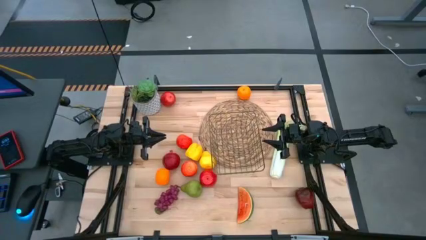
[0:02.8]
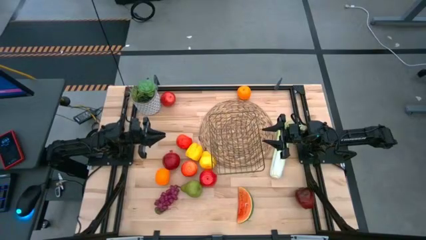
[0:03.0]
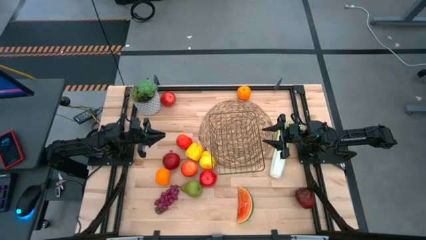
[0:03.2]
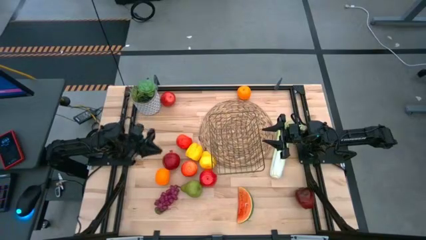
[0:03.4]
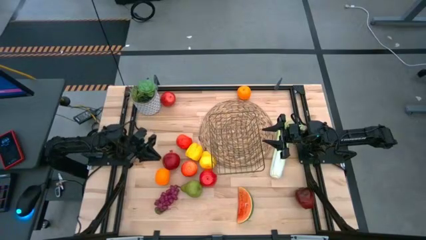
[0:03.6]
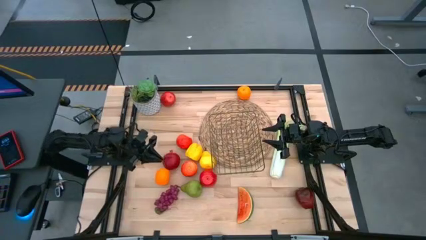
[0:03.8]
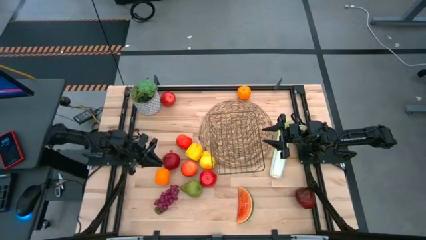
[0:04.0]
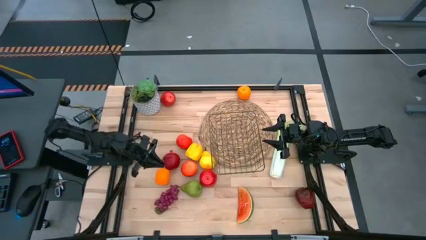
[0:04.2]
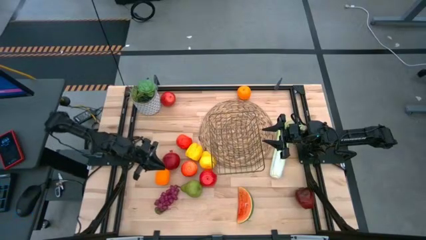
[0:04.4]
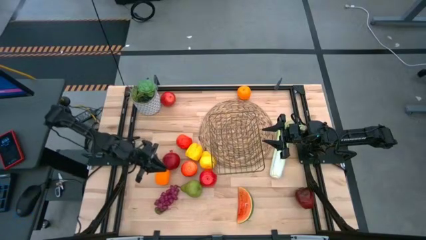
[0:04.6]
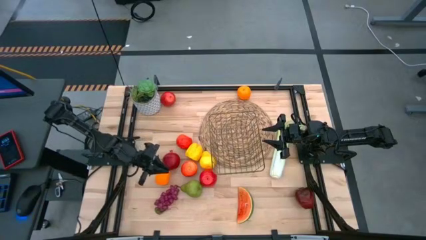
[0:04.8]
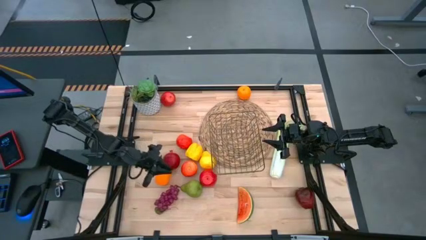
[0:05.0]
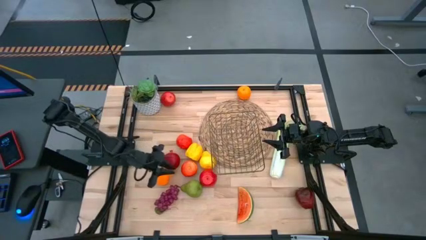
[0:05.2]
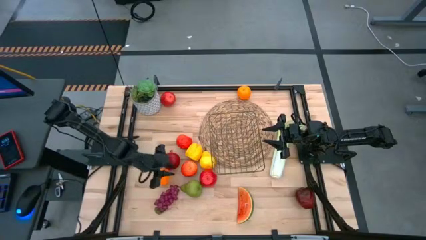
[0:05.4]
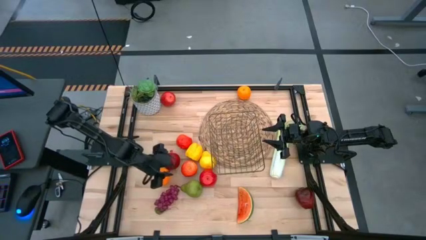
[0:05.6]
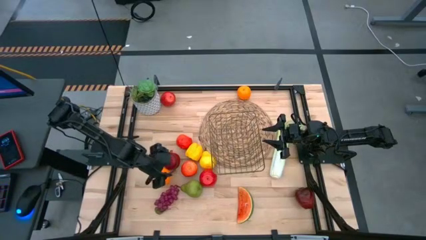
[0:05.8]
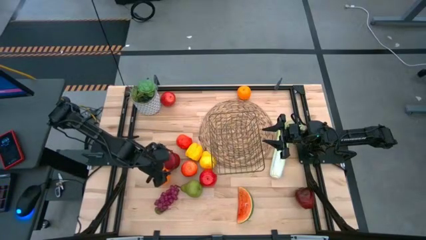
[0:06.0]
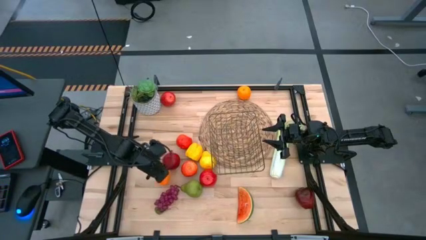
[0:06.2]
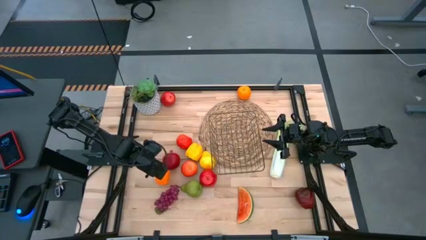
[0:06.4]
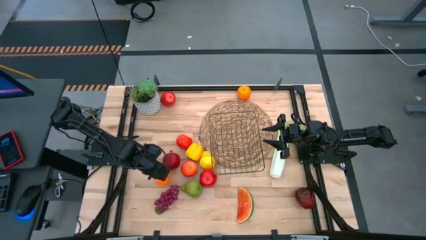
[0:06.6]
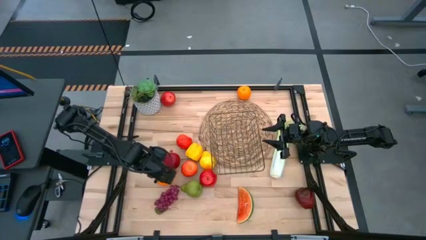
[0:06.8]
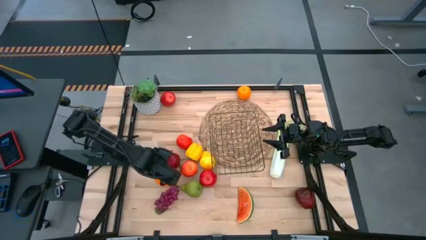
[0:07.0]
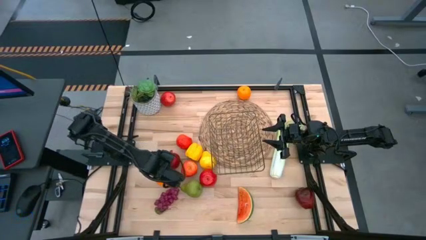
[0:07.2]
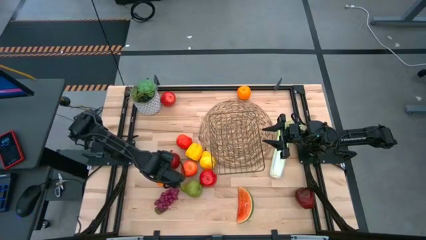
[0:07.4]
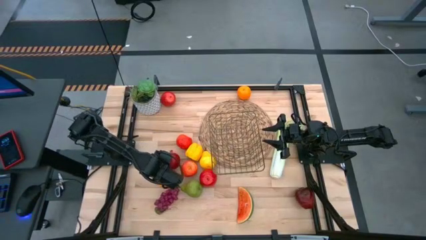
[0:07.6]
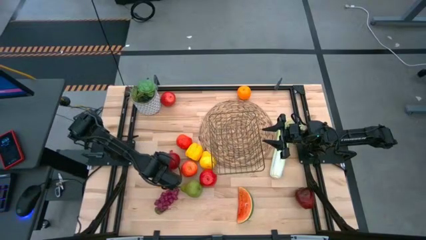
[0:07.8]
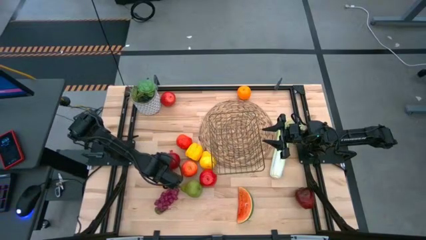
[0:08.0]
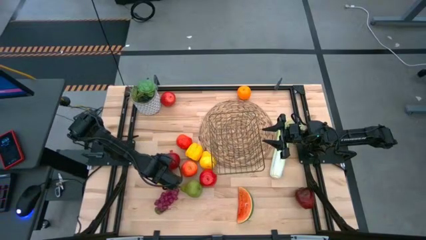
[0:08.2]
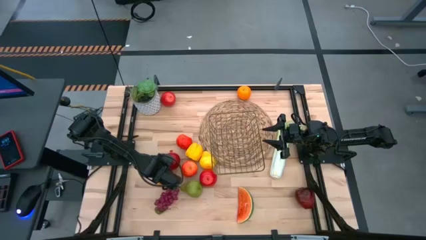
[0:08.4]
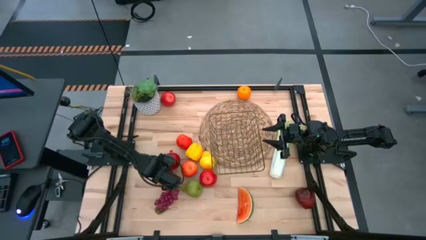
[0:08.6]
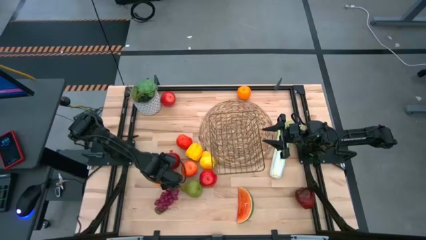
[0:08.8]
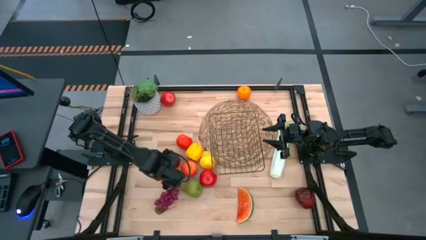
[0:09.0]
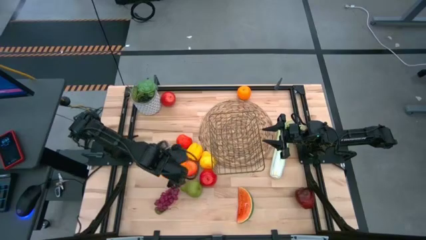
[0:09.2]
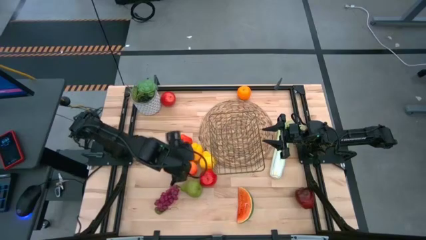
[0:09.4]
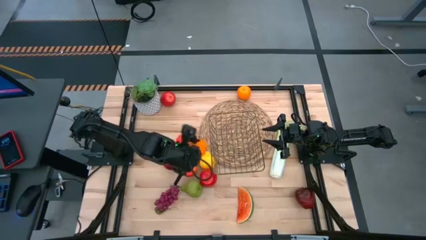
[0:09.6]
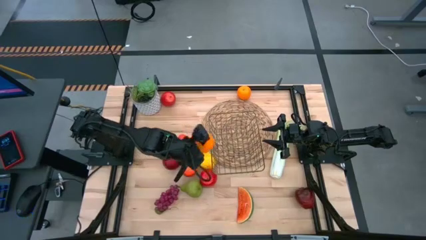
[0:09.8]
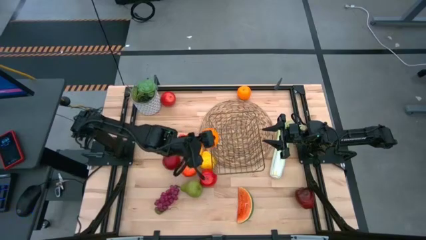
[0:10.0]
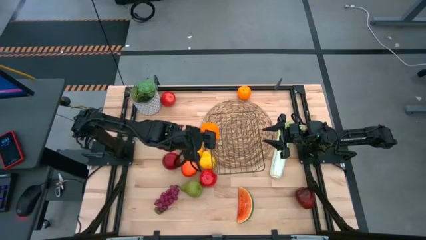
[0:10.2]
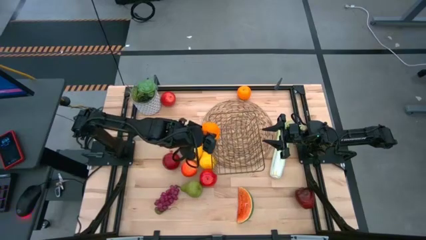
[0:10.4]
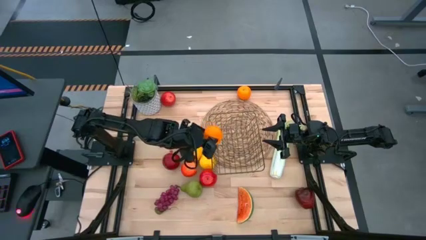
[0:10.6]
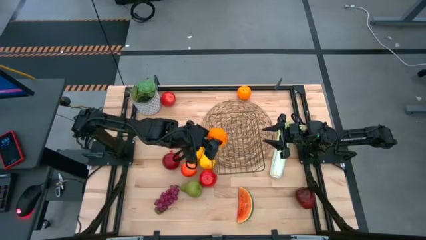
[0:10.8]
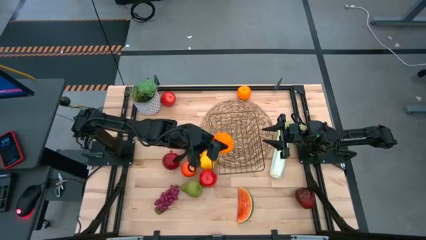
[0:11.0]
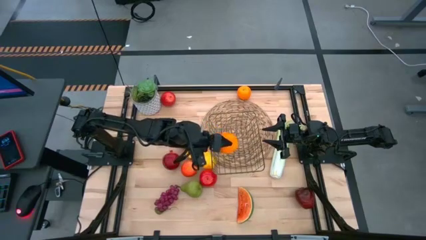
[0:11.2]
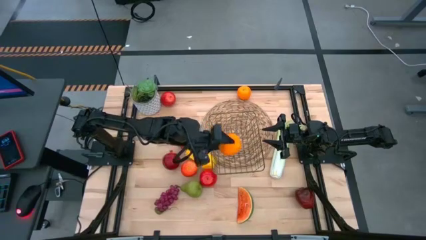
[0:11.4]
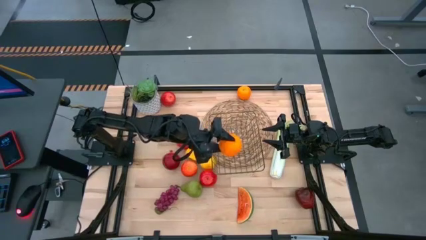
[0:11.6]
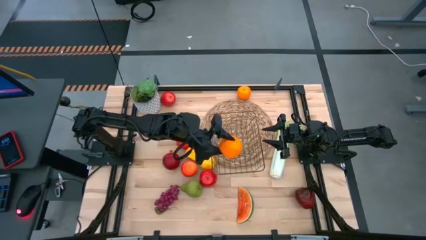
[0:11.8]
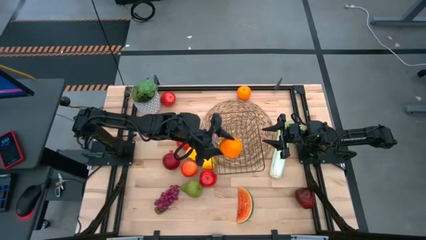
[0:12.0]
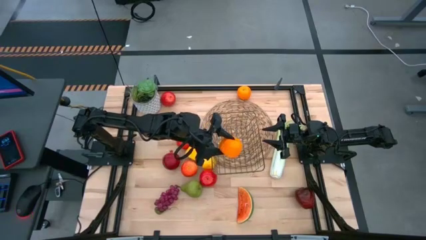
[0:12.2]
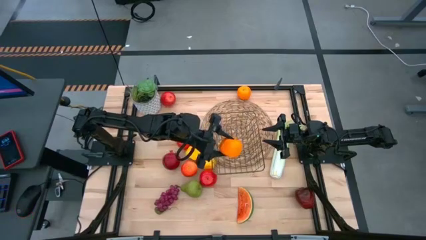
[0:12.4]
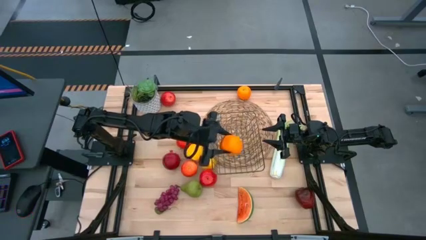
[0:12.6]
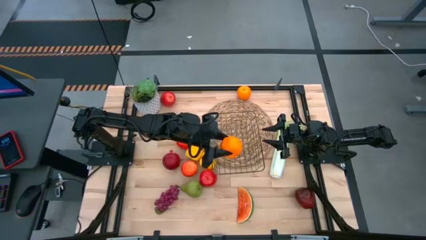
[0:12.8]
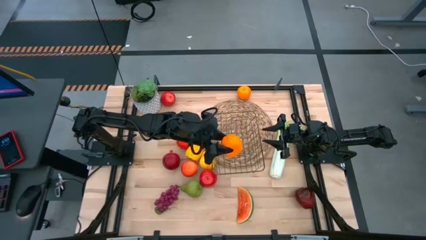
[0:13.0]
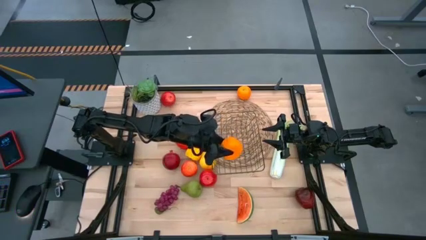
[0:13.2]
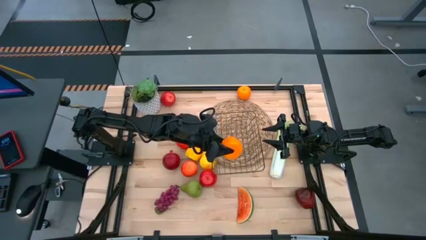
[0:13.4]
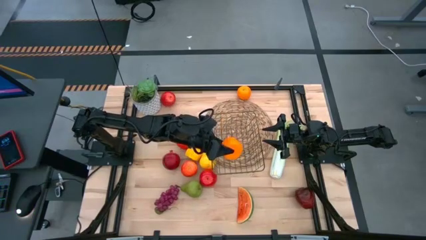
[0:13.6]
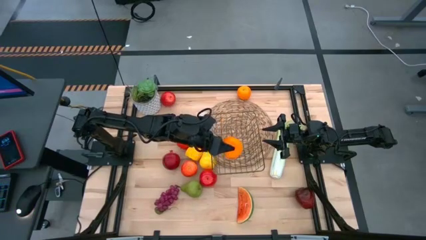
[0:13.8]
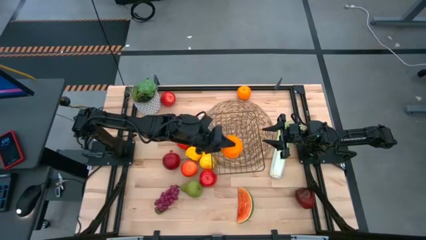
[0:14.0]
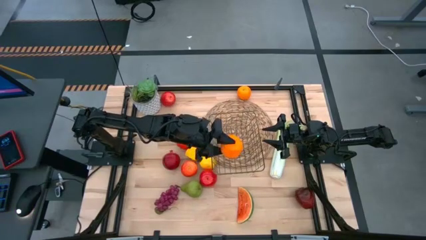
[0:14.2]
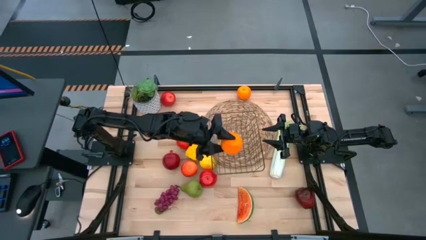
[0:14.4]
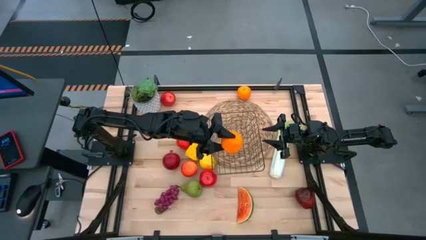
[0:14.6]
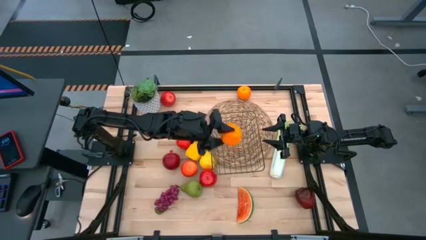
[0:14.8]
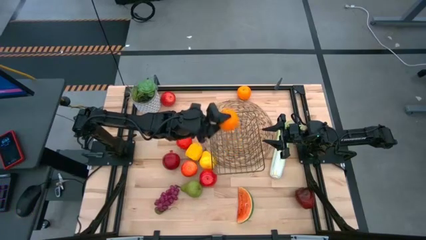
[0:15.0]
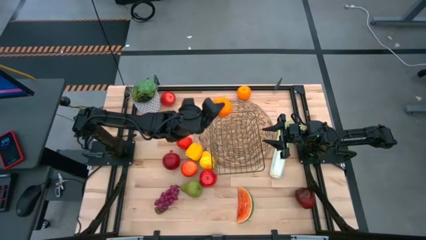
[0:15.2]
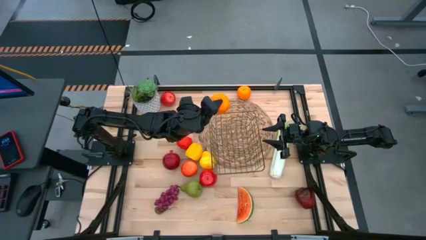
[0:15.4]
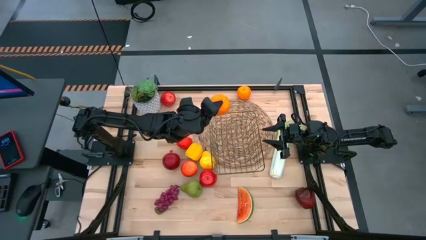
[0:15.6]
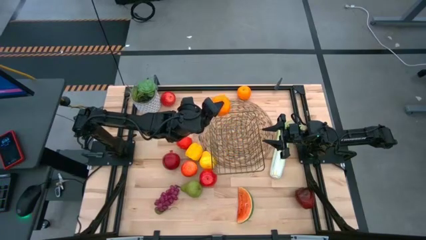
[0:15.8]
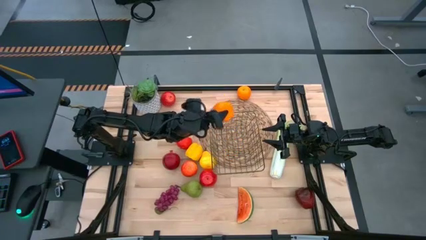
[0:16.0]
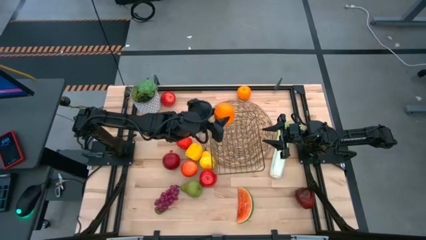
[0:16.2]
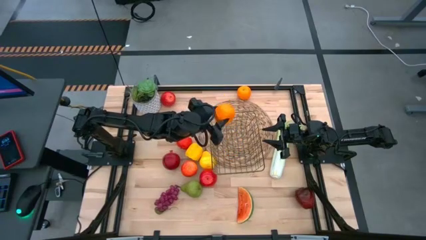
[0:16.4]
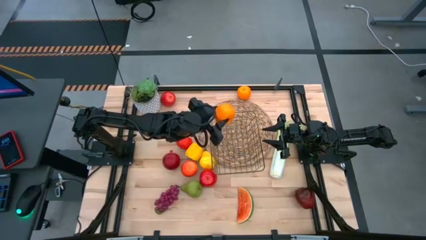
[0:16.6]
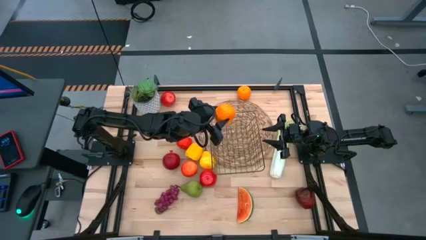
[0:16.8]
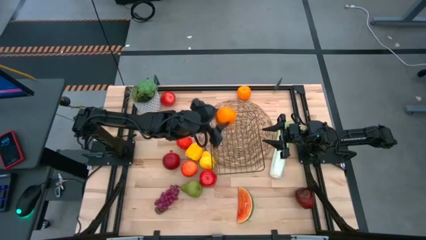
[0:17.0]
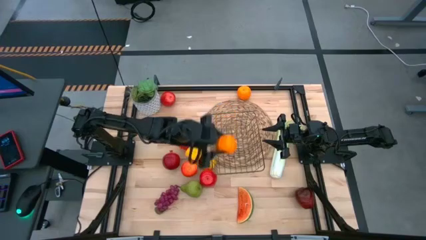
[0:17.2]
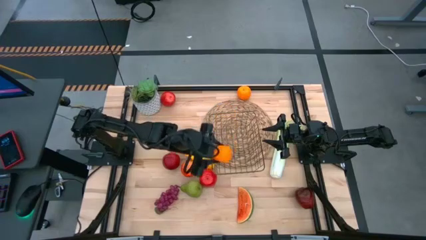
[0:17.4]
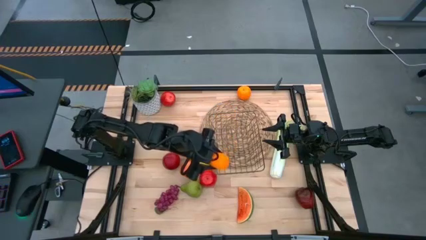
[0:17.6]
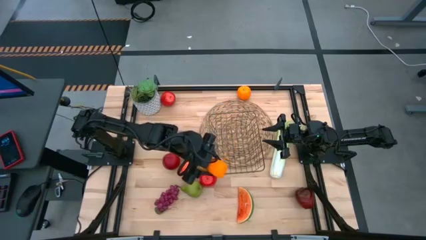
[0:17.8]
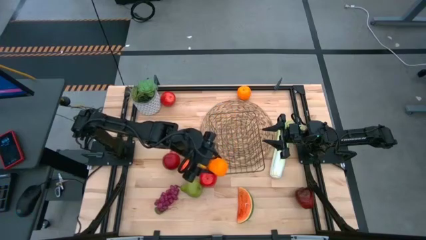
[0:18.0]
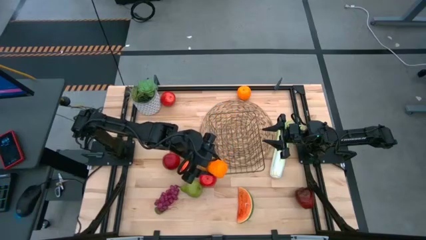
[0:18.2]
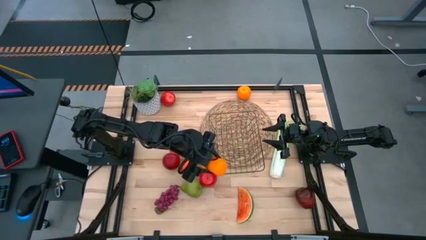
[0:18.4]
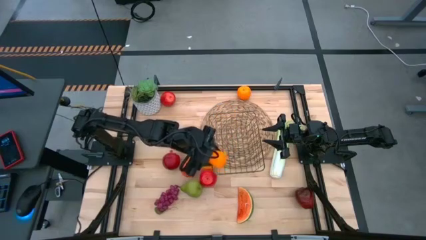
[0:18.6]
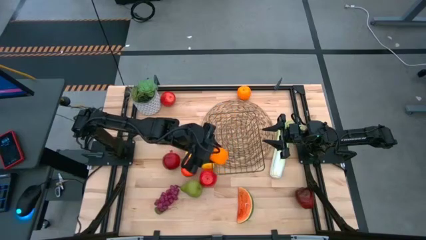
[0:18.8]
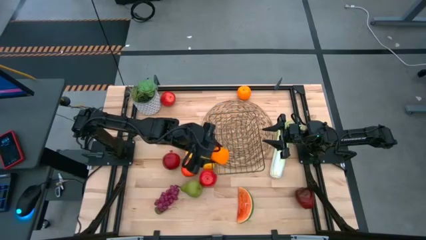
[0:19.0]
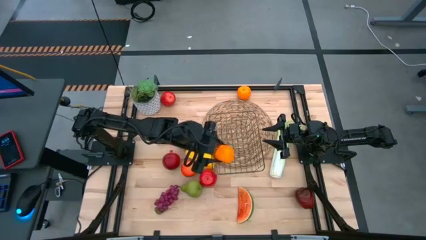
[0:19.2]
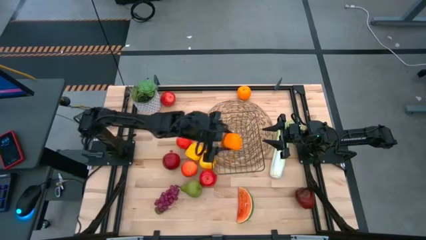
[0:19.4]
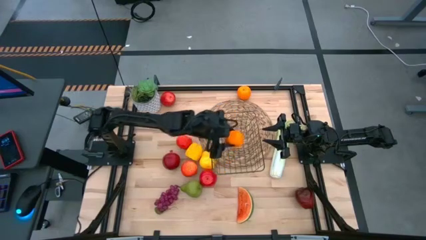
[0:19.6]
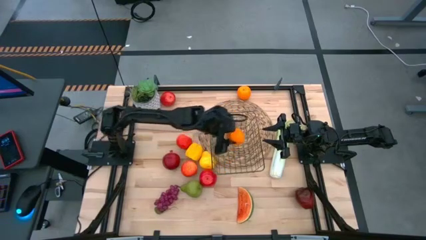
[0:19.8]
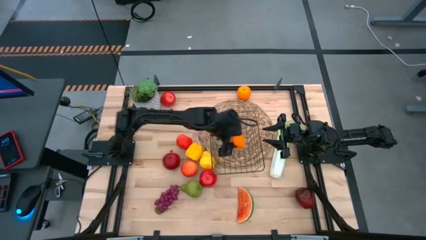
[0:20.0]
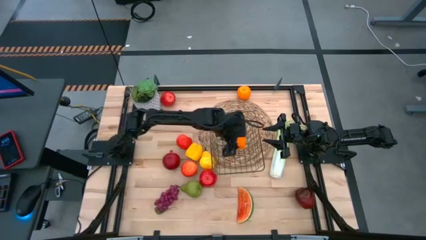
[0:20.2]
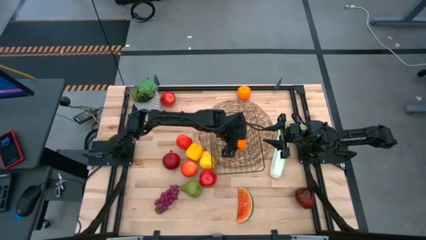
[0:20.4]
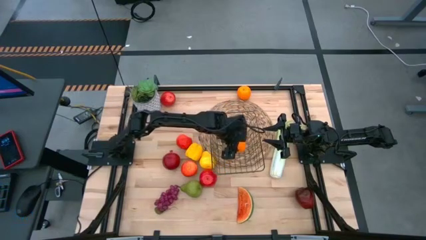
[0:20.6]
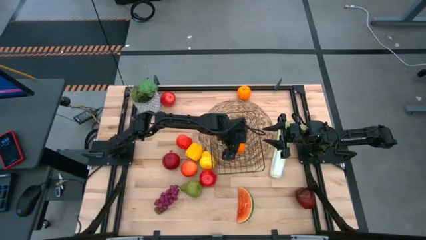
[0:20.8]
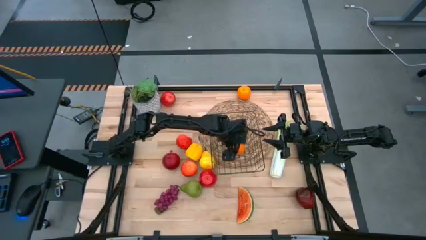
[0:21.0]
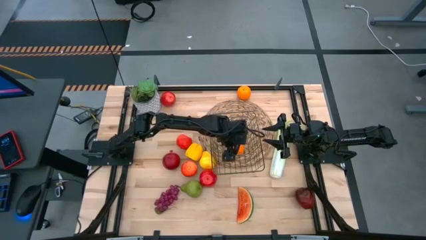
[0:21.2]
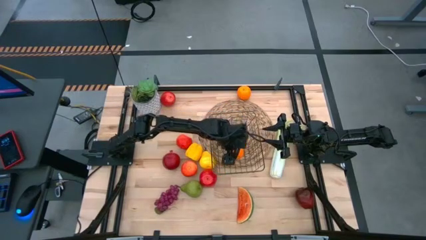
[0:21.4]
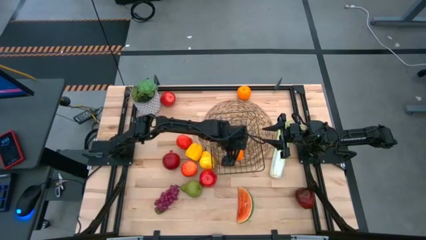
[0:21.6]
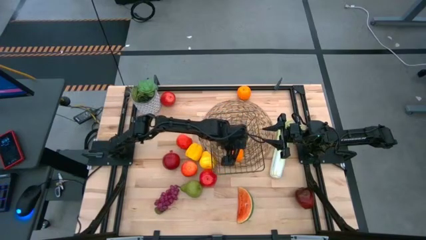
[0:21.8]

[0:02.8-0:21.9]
Task: Build produce basket
Put the bottom orange into the wire basket
